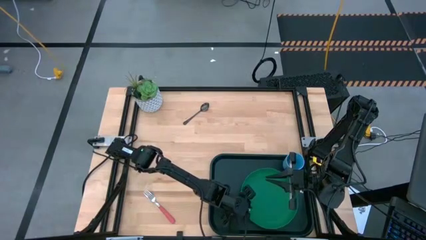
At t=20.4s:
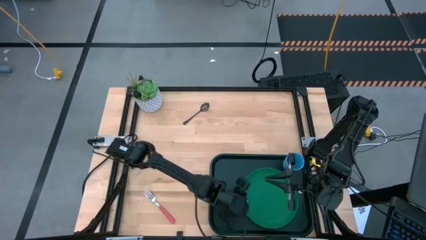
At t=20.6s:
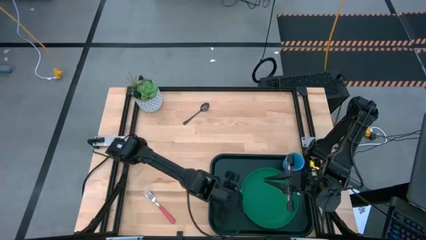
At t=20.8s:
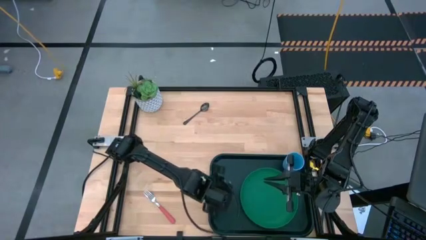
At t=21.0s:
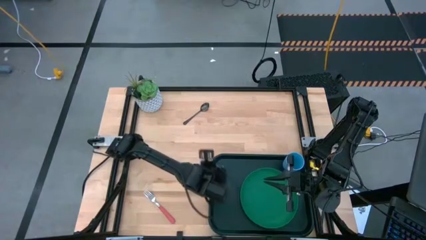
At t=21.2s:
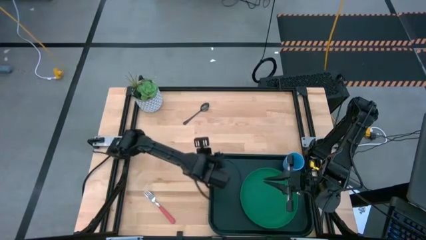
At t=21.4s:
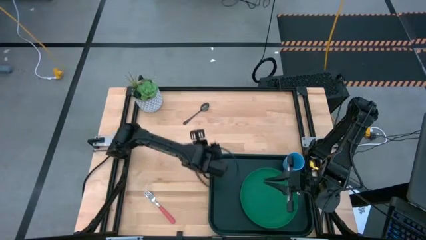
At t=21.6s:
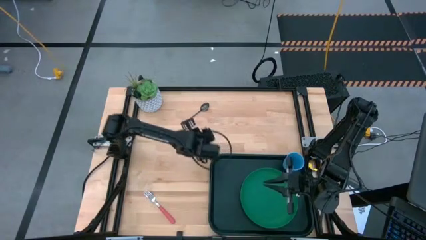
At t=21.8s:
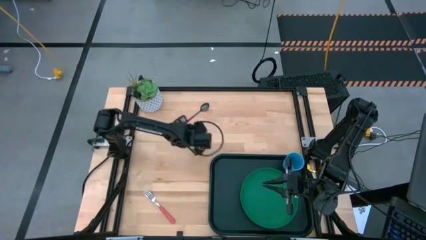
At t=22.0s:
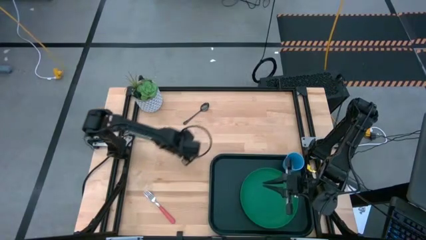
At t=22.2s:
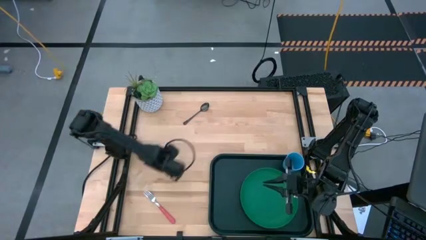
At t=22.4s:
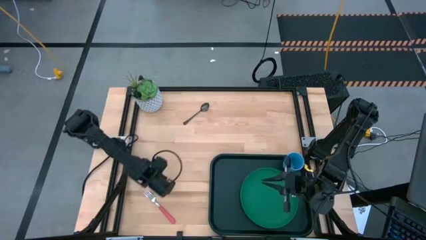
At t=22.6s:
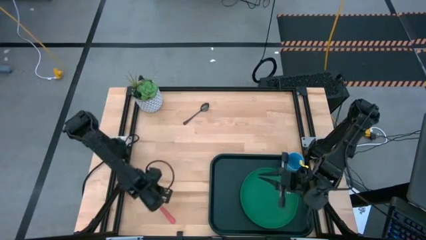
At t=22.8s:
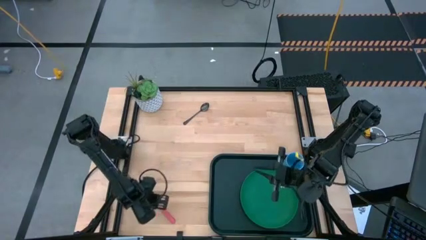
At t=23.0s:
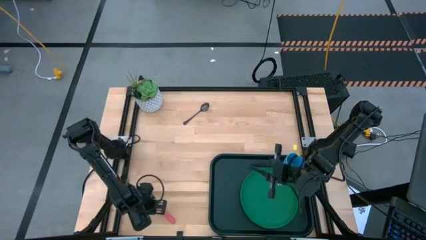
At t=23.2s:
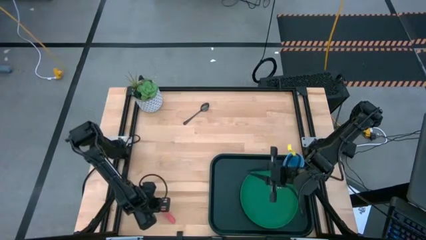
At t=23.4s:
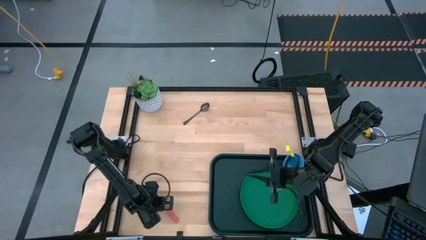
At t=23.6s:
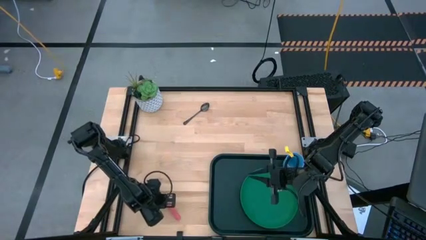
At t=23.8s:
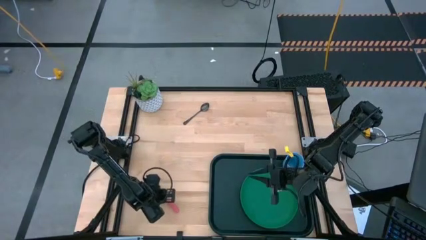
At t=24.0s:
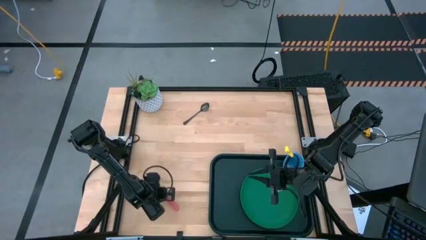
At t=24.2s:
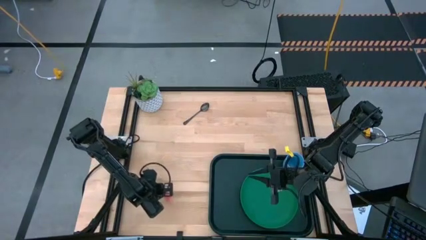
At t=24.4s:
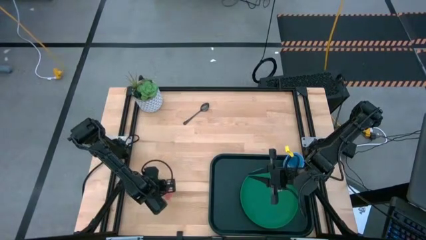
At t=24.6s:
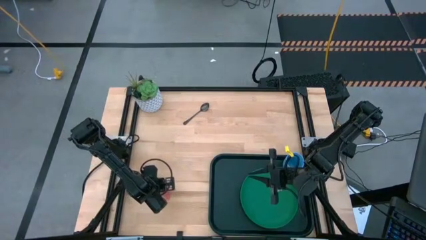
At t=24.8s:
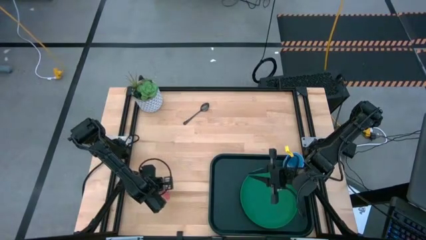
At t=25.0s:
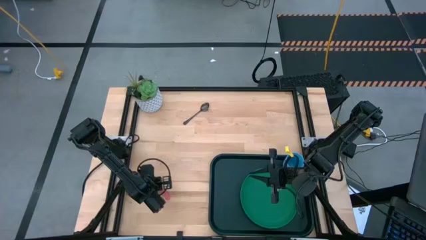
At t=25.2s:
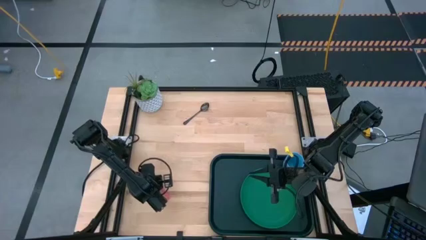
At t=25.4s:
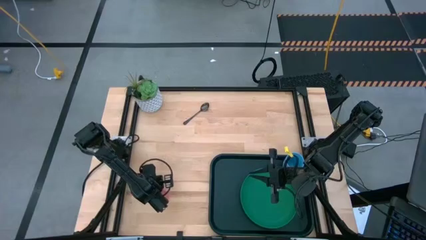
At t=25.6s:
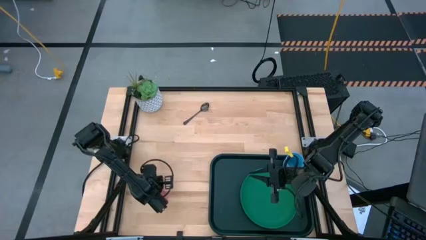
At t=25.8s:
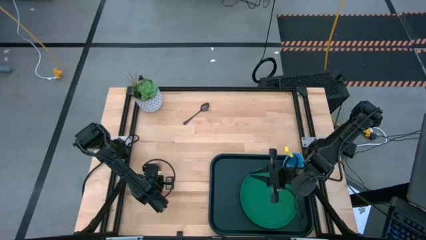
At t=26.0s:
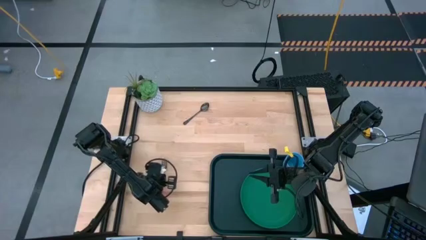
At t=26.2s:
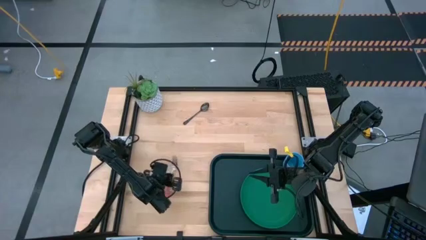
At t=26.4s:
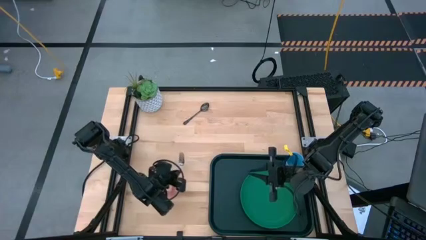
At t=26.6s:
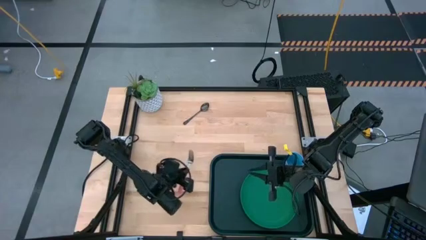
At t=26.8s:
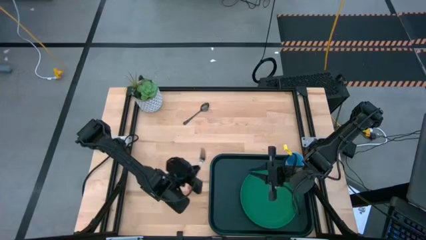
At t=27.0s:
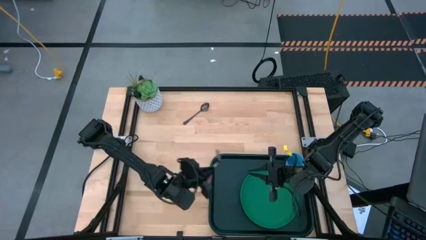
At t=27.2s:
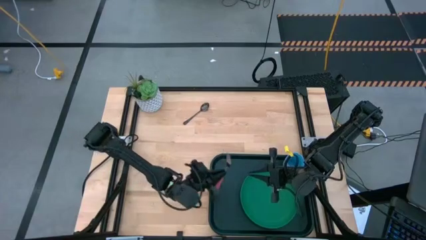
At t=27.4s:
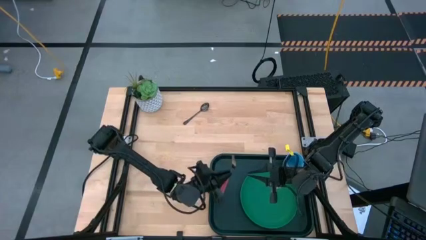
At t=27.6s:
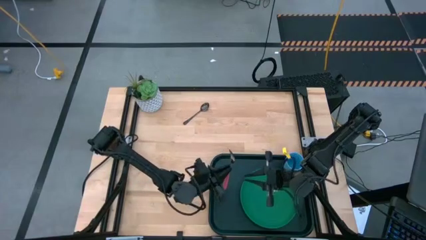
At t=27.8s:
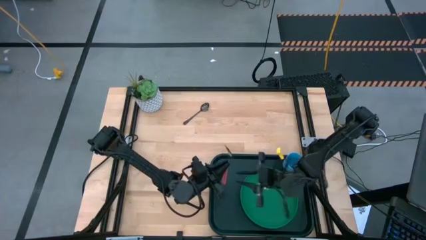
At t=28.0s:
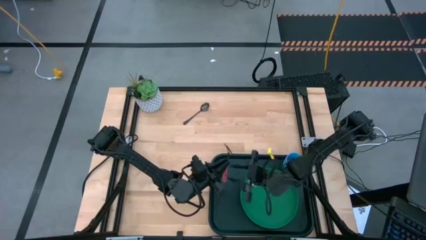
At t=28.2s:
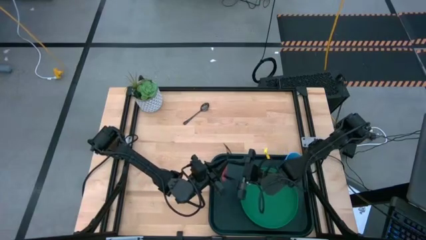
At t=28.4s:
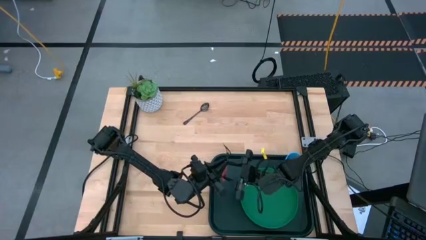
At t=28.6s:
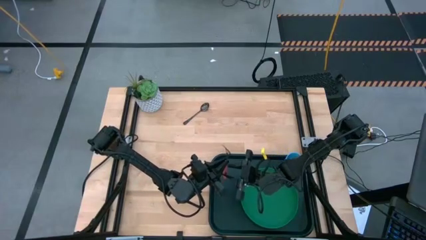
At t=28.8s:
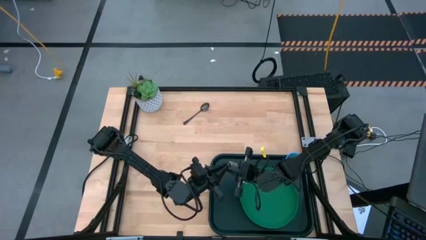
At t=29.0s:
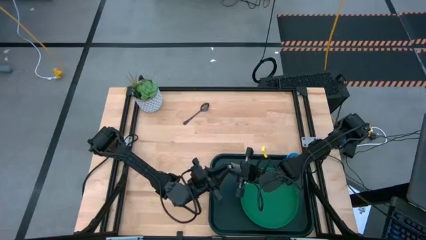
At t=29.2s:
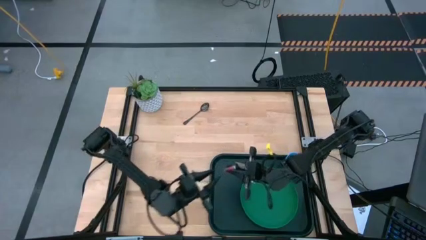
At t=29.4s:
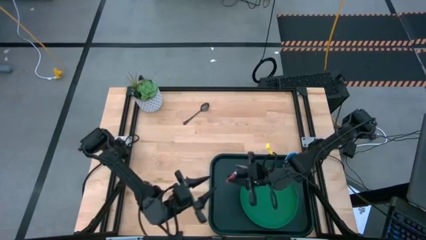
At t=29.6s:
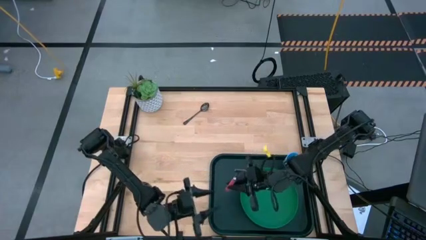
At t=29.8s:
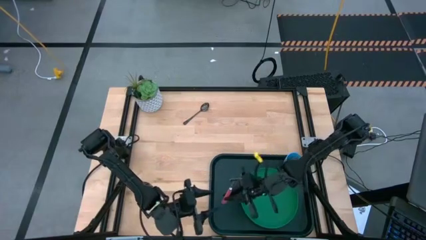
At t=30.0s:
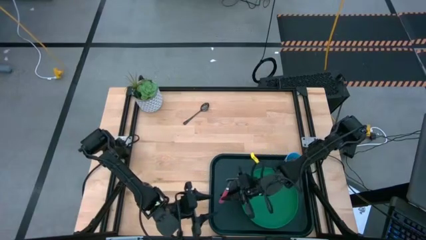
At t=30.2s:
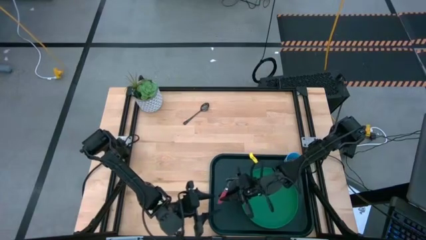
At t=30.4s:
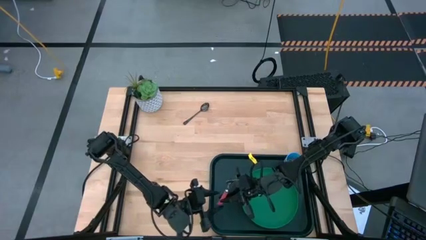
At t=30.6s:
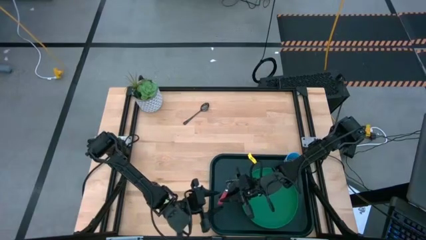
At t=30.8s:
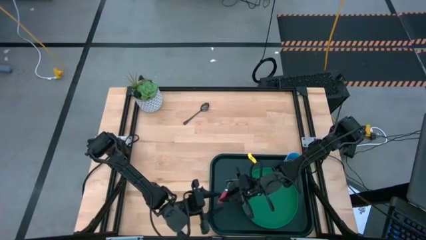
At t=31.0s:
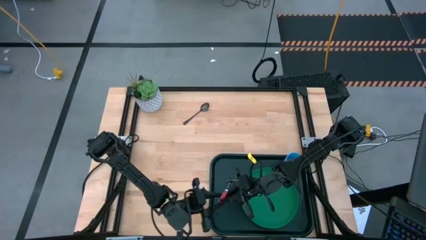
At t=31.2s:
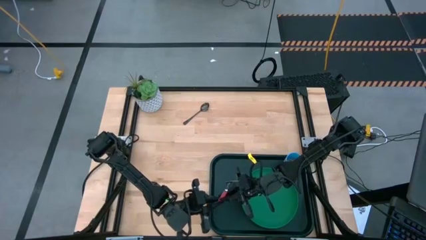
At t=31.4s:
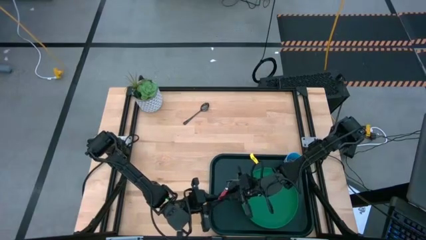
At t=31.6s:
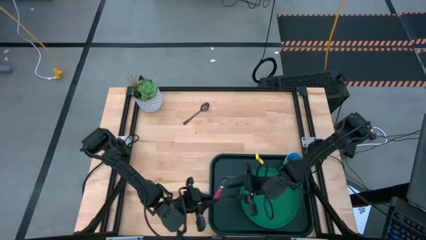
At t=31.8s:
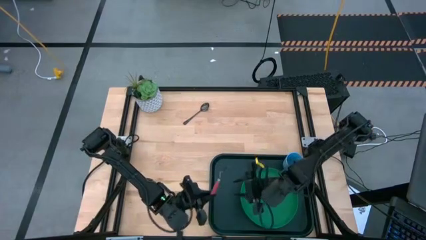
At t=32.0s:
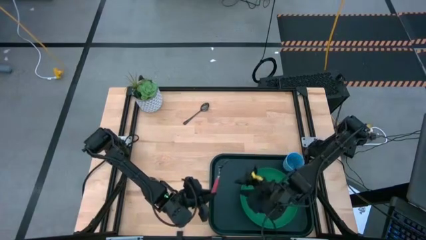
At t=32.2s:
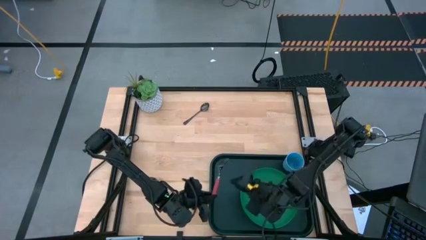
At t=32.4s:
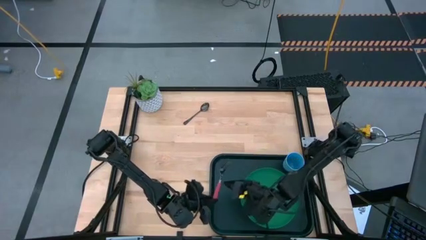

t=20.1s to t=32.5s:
Task: Pick and place plate/cup/fork/spoon on tray
Put the orange fork on the black serving tray beside the green plate

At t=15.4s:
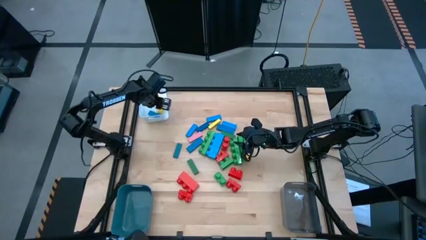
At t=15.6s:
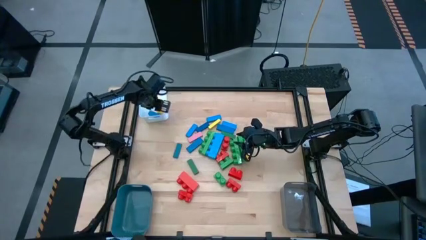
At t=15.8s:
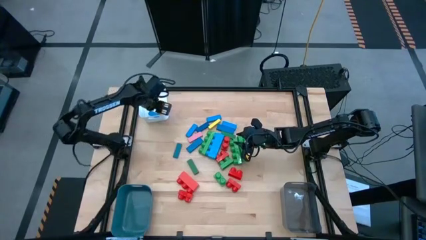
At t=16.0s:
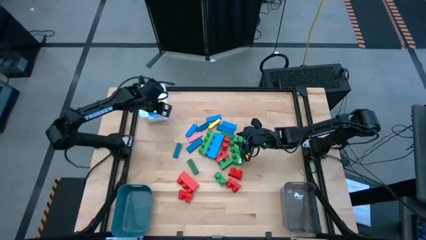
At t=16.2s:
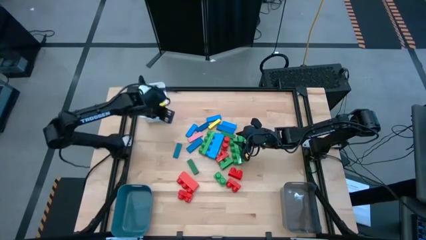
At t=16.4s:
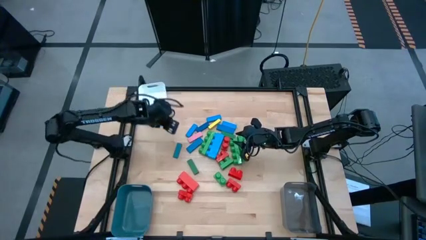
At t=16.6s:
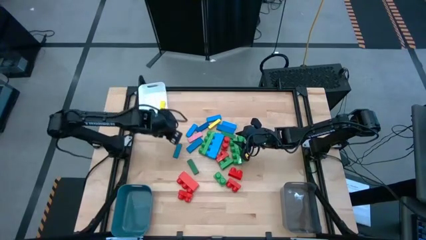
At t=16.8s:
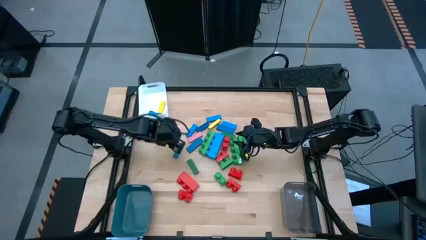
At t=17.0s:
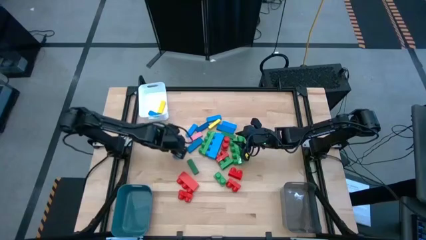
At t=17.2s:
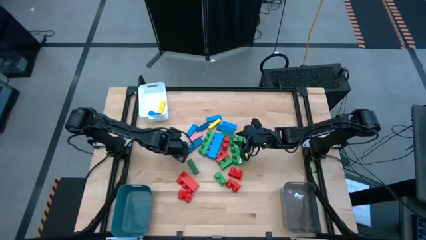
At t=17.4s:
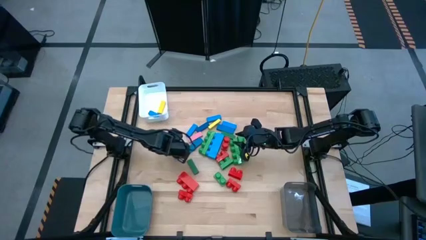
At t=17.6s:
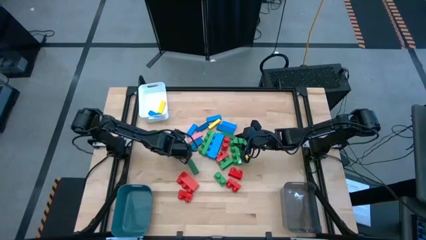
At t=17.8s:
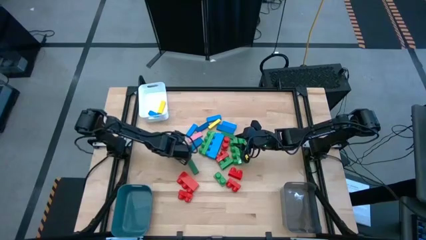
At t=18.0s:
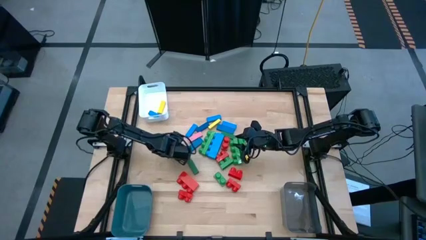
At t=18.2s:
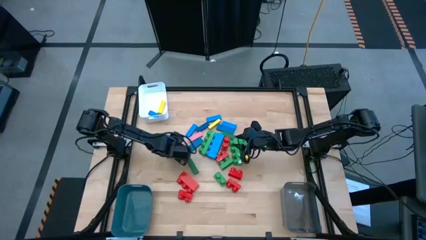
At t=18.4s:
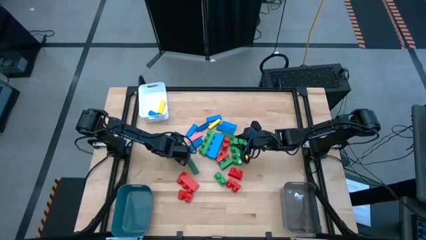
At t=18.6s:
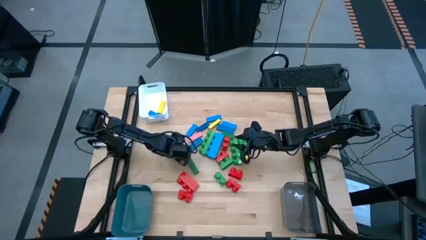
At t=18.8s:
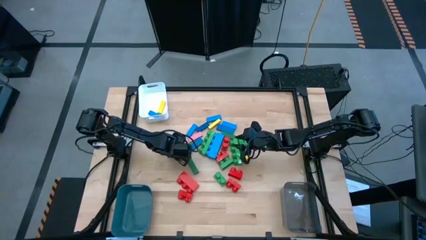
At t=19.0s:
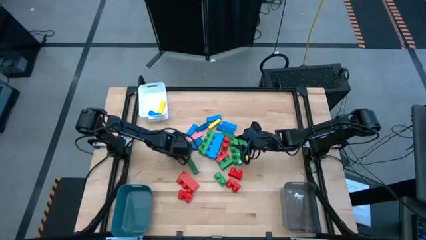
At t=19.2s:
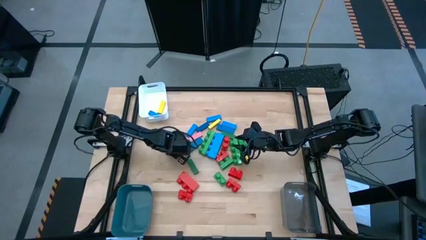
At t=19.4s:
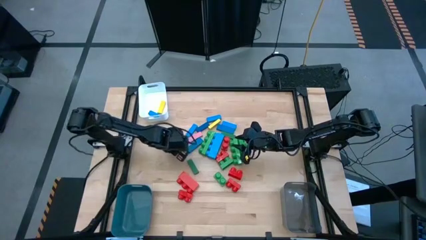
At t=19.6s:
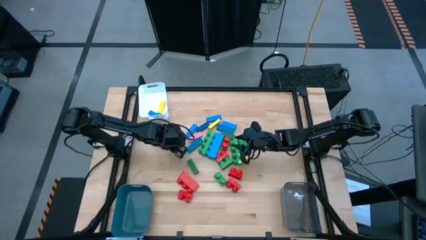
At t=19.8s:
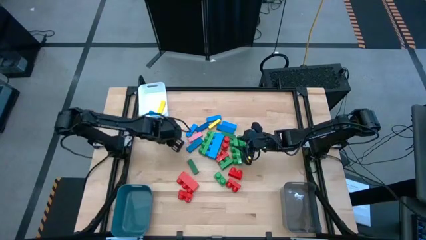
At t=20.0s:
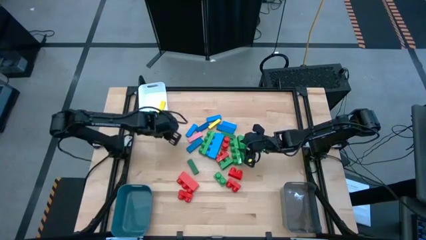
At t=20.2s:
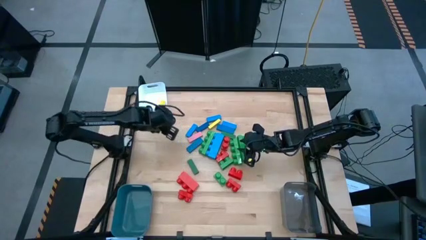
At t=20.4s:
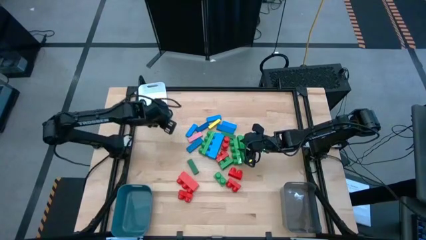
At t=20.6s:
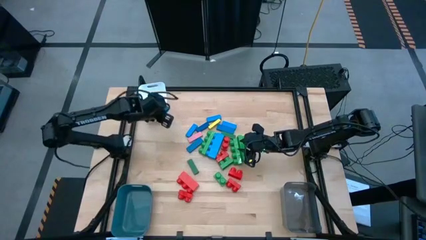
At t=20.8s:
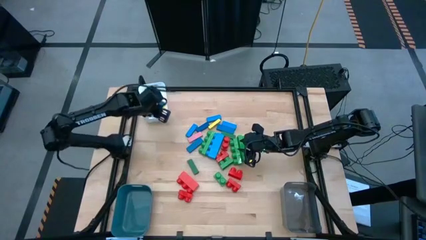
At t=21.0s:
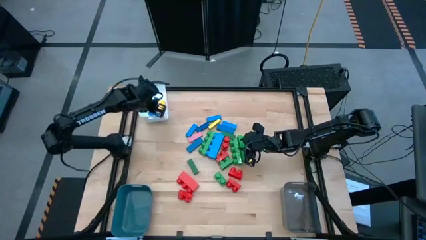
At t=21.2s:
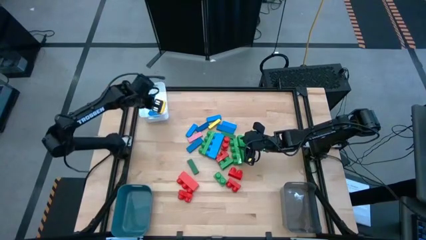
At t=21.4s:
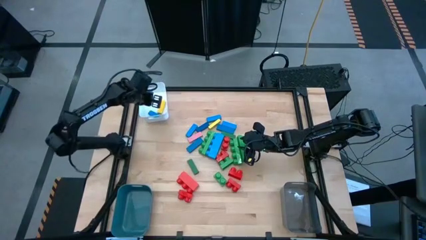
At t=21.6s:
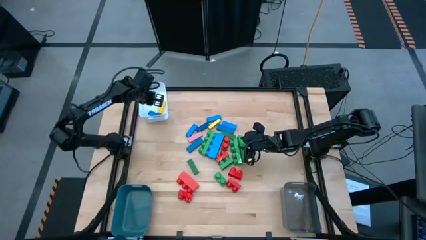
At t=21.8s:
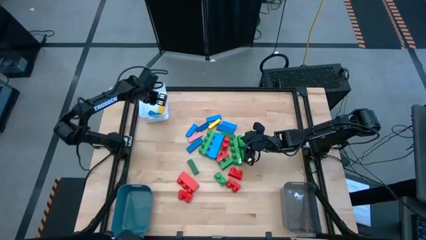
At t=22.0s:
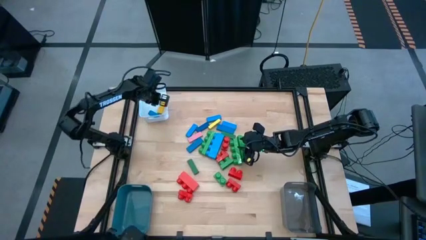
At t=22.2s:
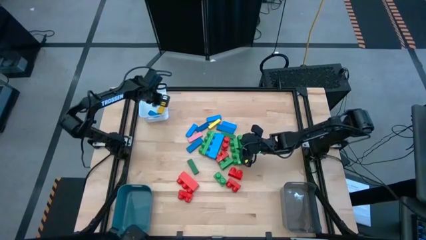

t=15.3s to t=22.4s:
Task: Sort blocks by size
Put the dark blue block into the white bin
